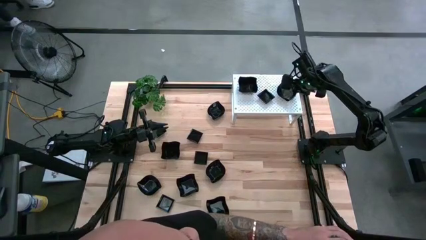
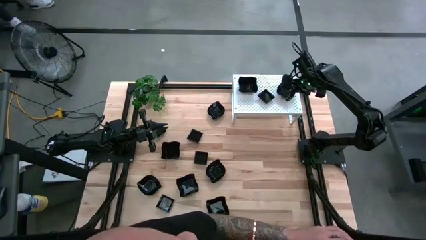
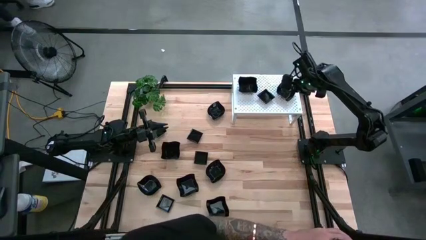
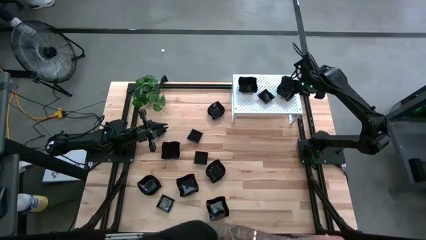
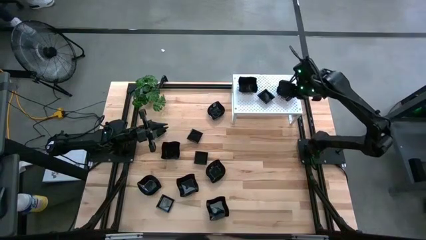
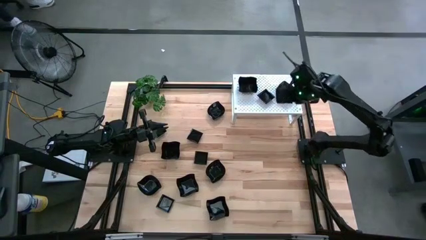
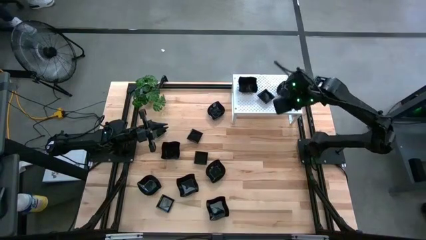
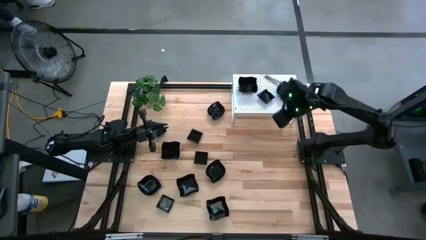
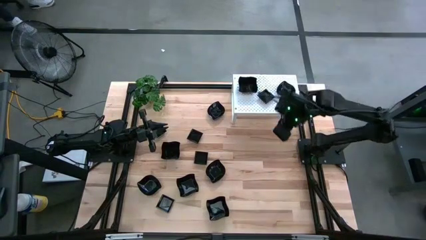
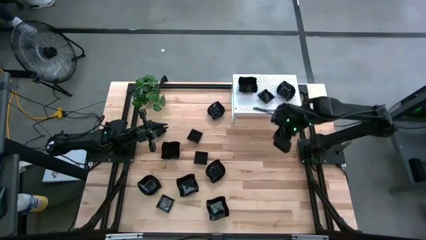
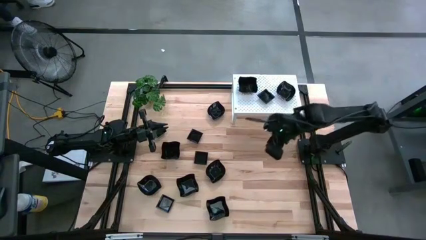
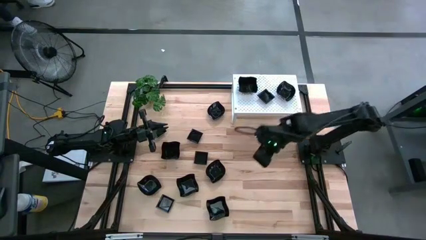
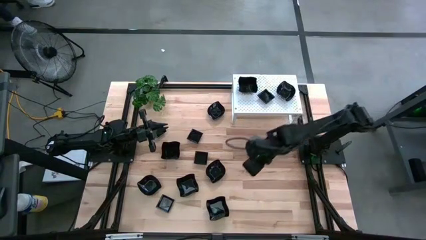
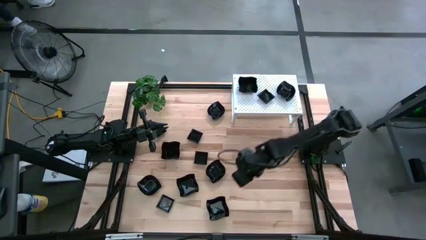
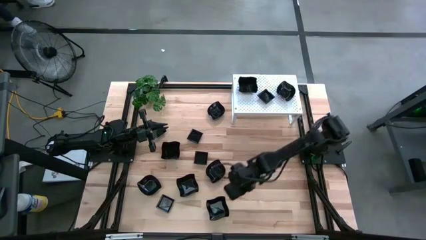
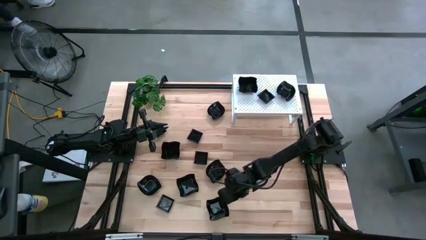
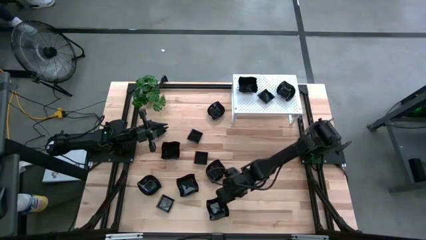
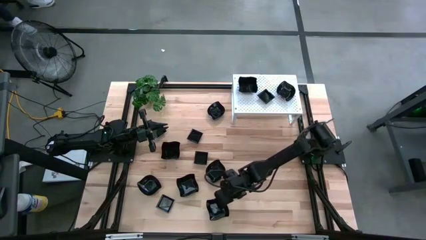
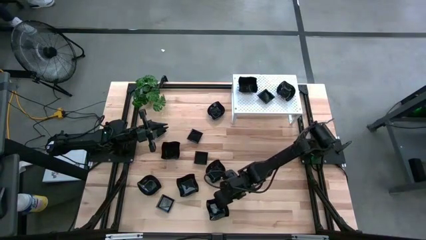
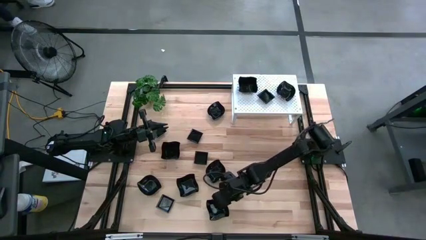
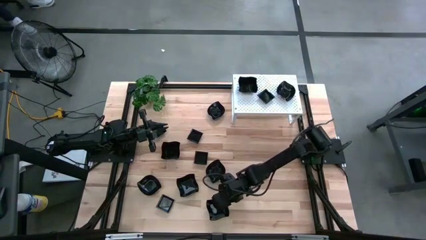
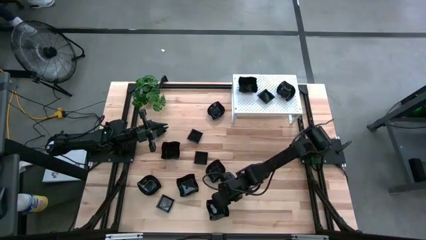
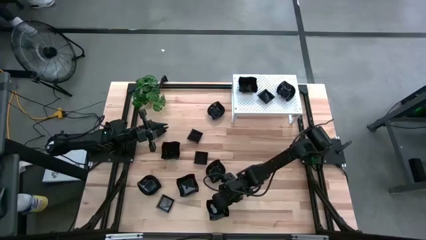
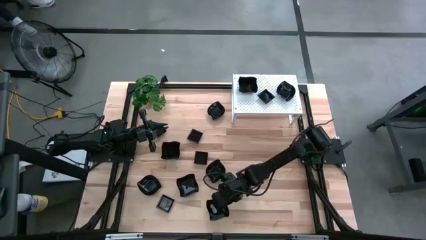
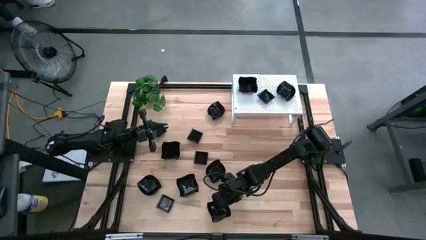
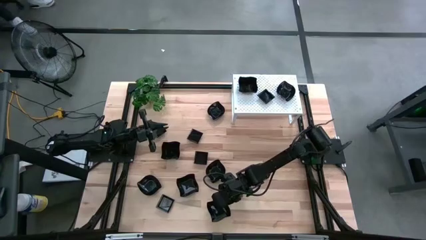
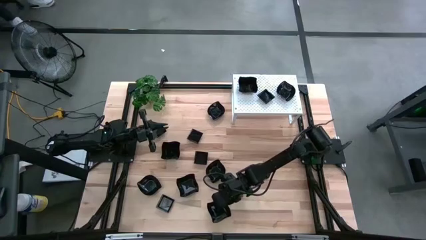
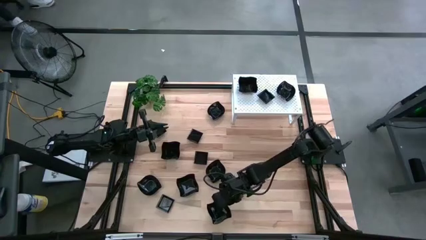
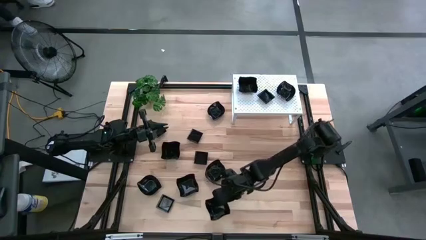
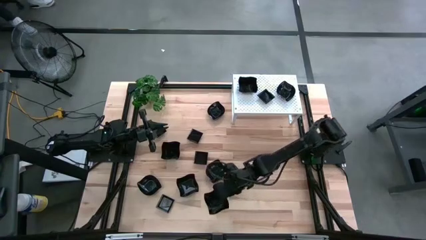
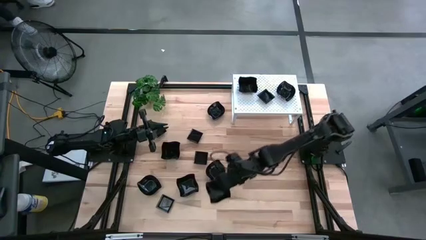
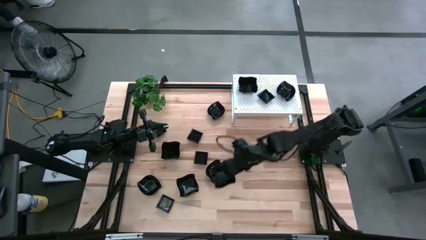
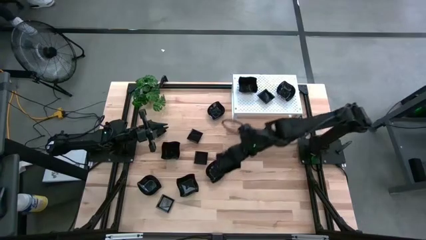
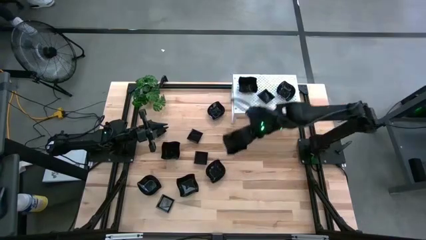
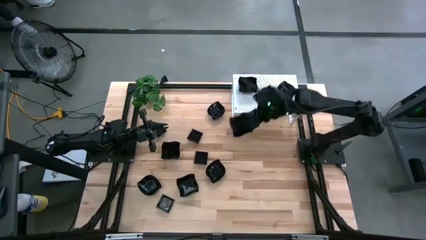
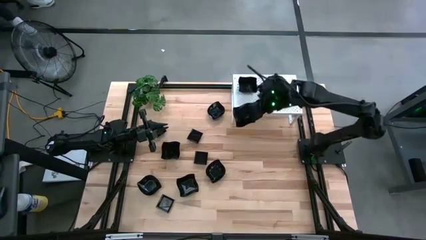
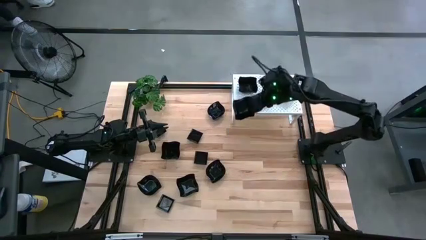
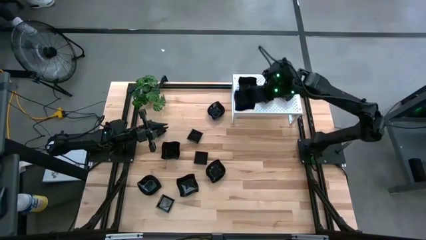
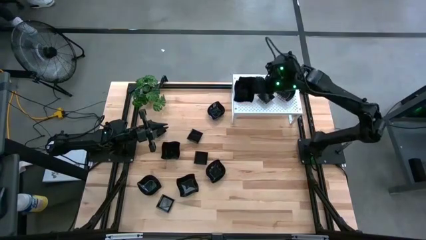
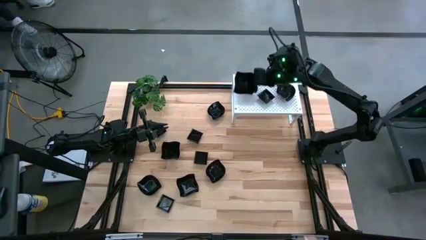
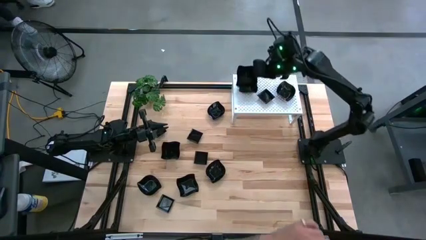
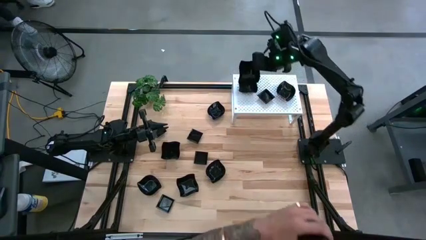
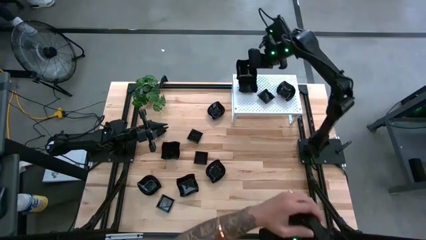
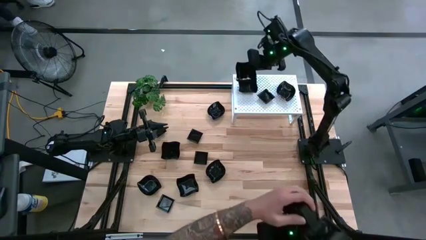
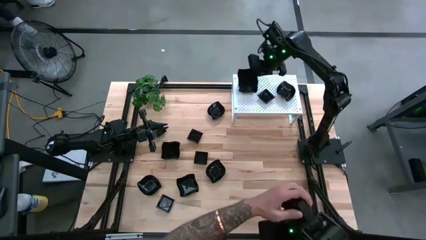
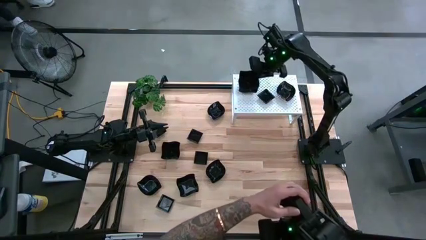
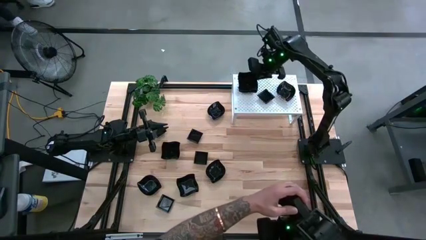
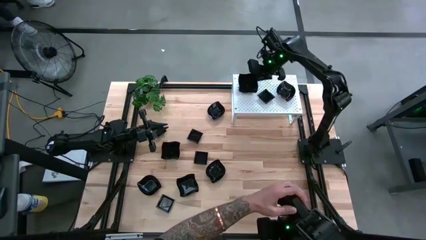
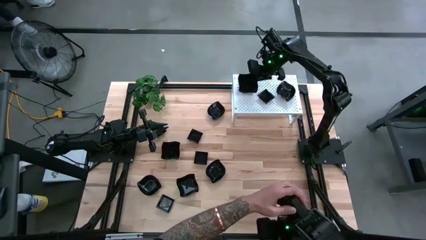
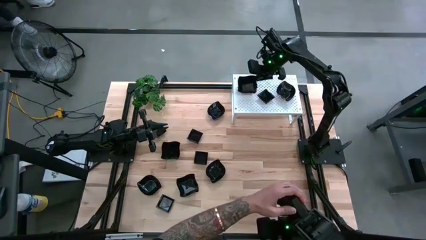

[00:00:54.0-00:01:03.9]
Task: Pick & Place Mini shaped plates
Stack the distorted square plate on top of the distorted square plate on the shelf

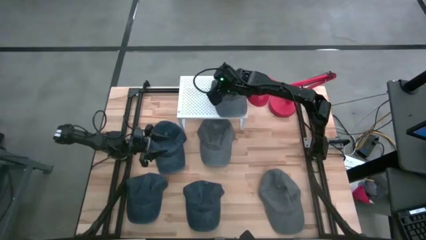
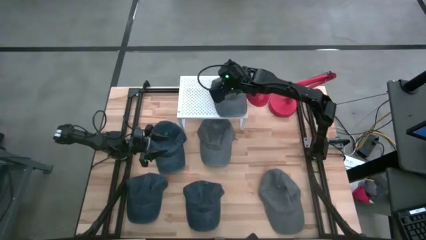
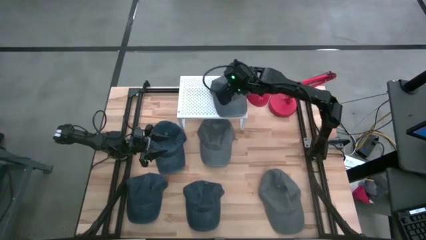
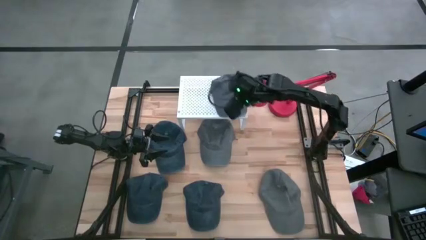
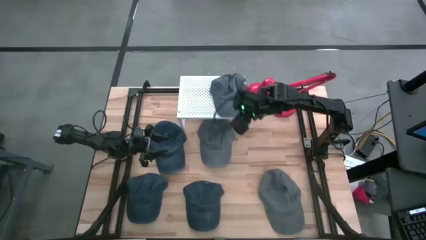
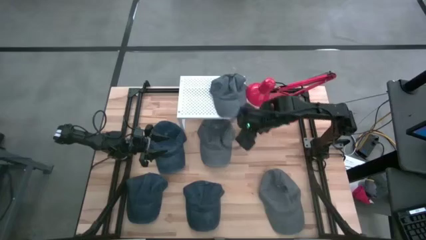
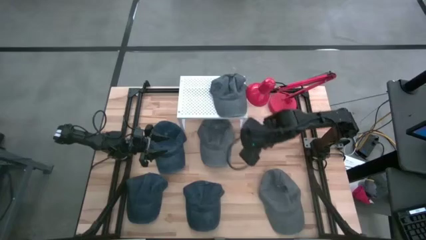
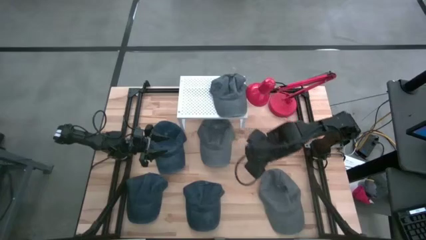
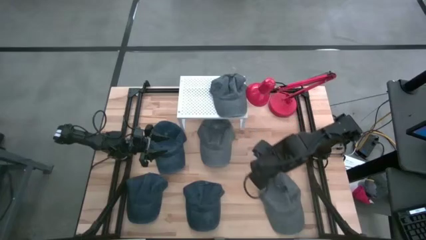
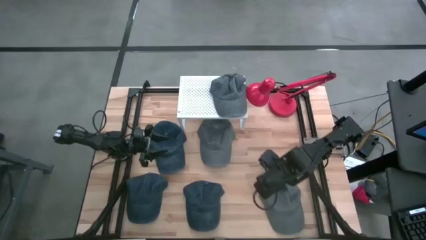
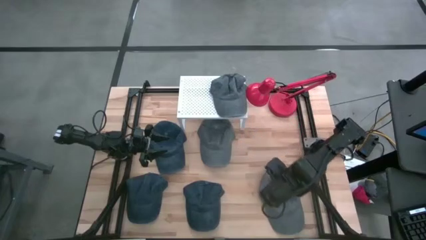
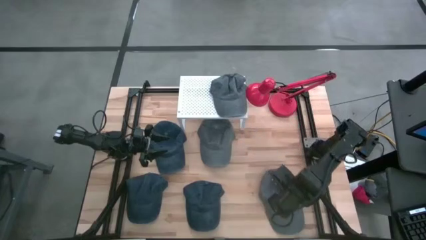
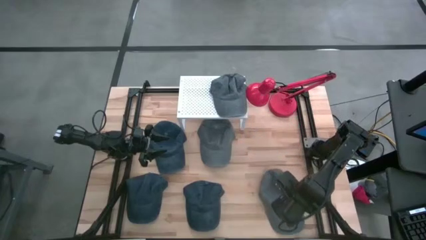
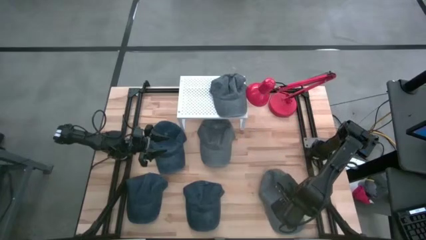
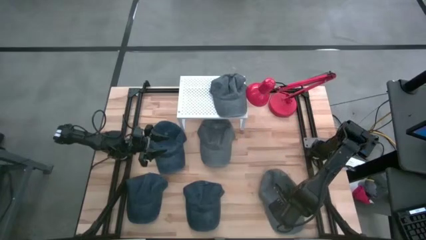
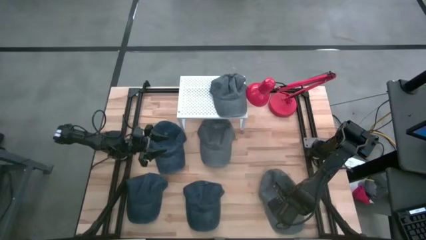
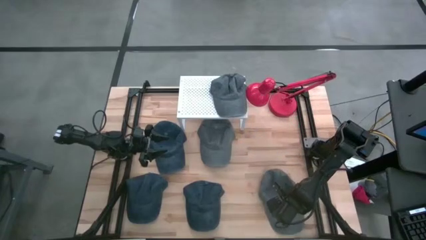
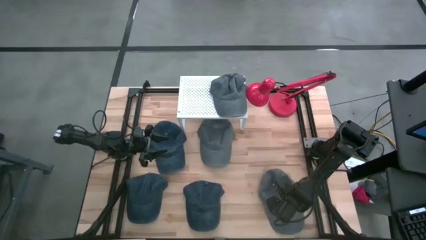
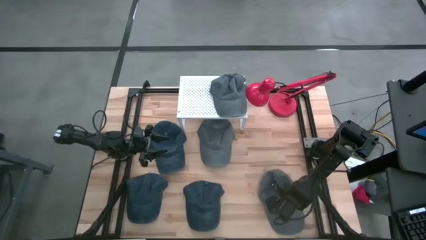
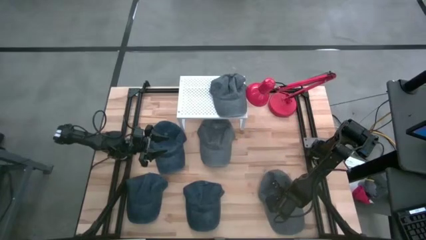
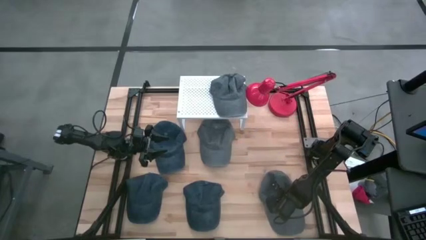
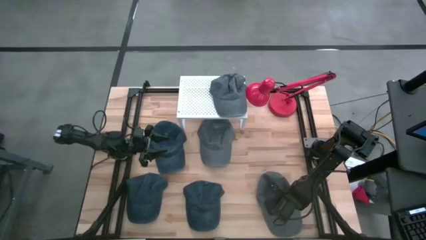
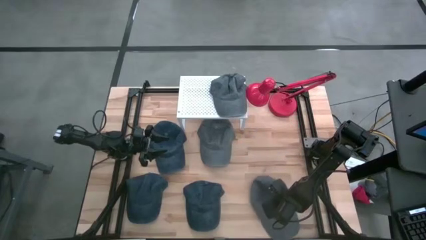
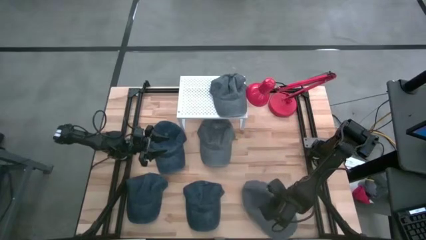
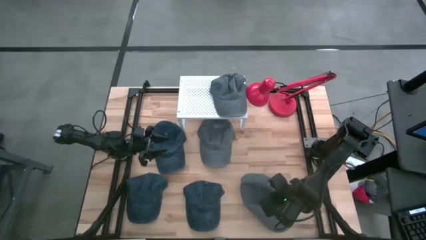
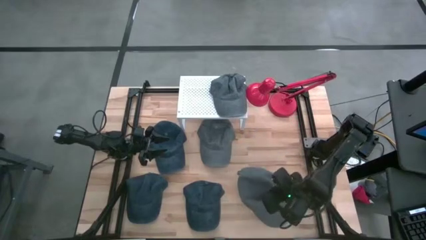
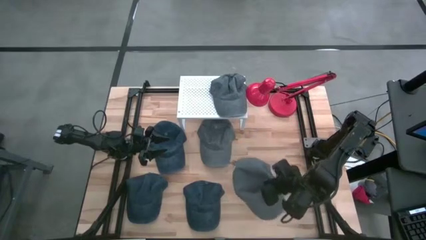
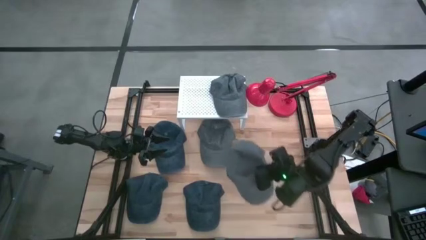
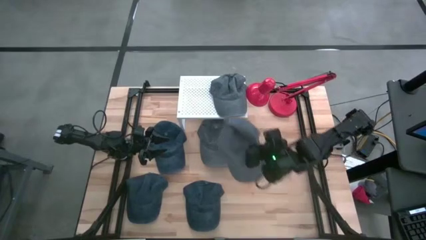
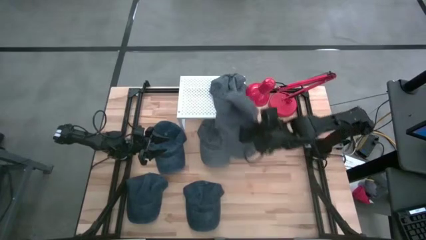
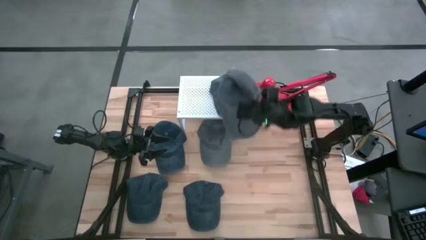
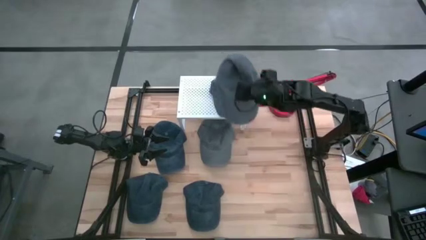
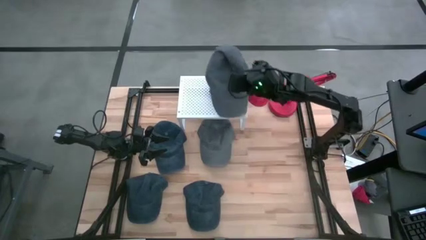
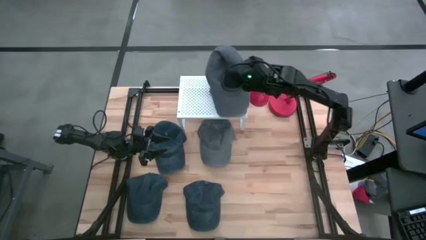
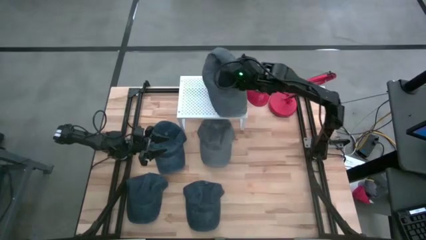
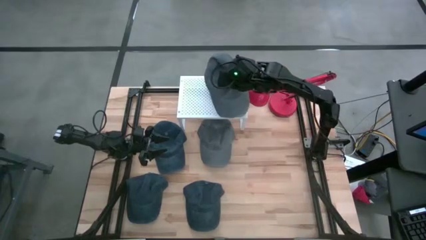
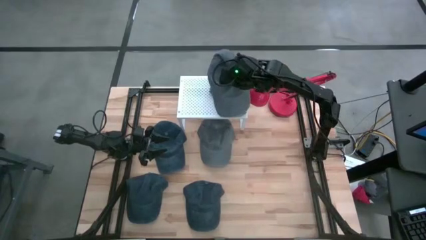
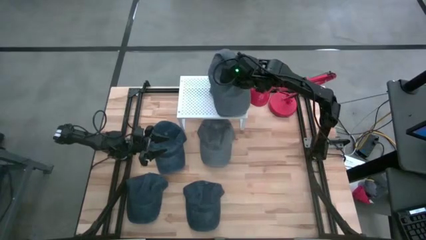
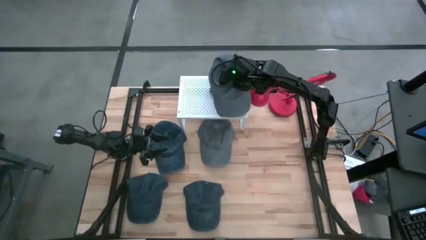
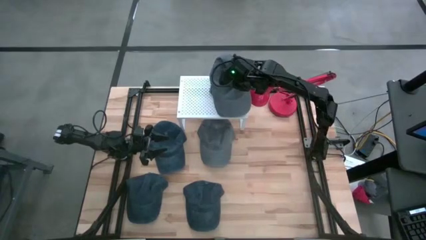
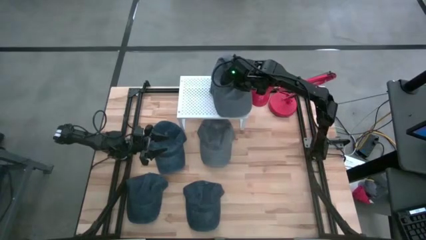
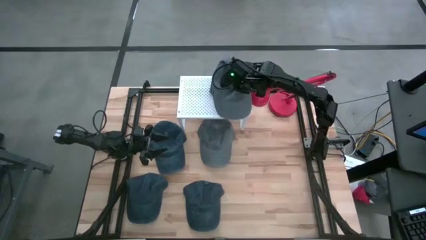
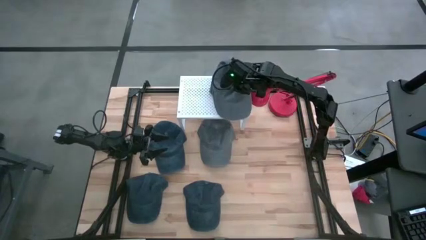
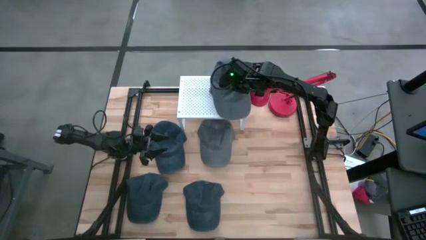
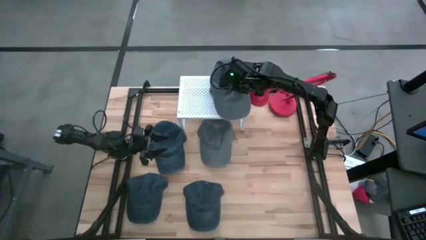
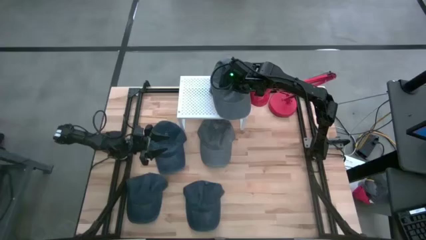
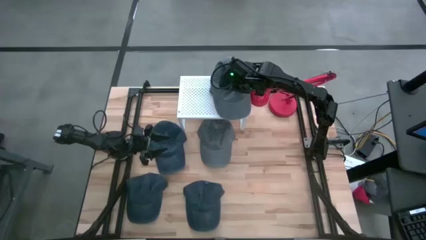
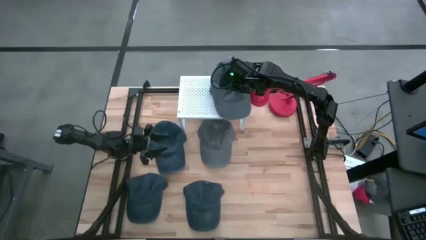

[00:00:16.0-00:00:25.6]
Task: Pick & Place hat
Stack the bottom gray cap on the gray cap on the shelf
